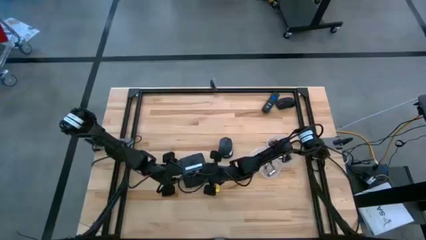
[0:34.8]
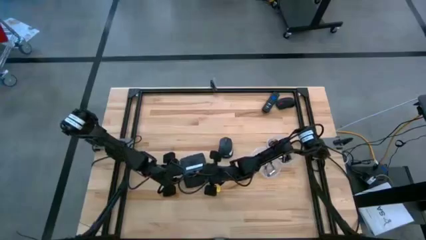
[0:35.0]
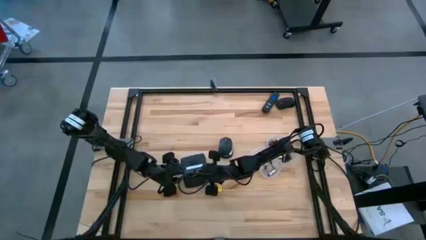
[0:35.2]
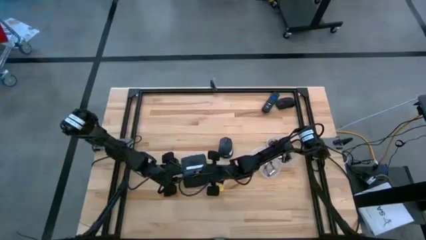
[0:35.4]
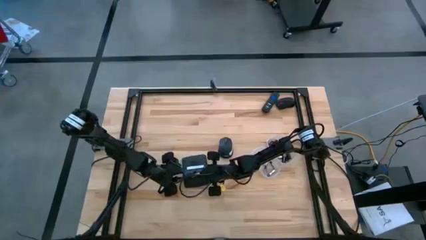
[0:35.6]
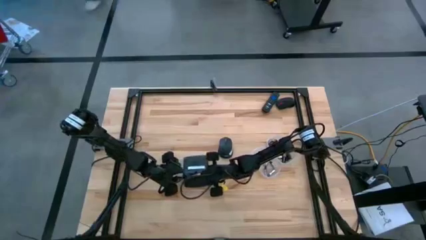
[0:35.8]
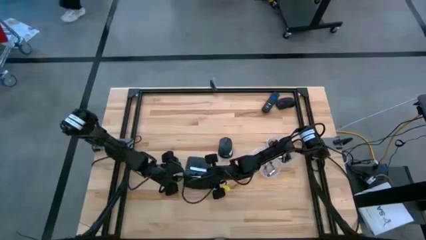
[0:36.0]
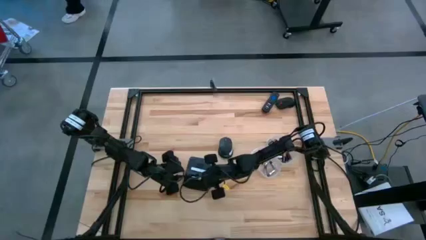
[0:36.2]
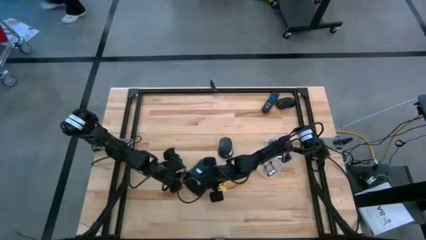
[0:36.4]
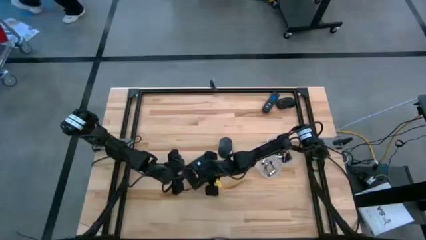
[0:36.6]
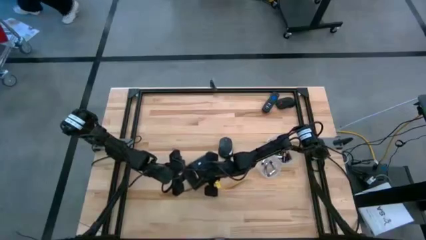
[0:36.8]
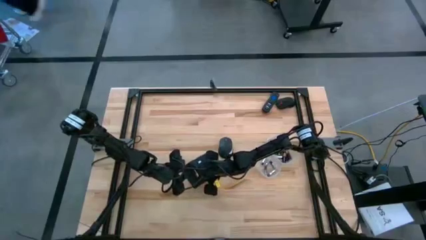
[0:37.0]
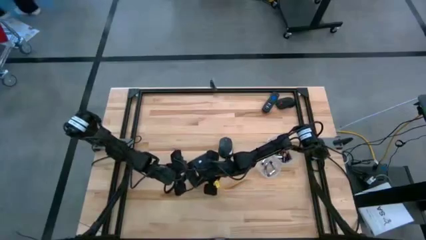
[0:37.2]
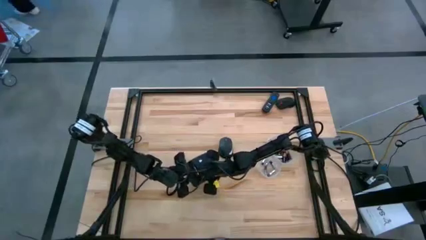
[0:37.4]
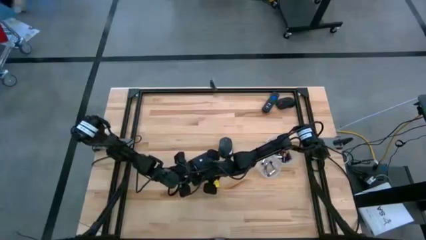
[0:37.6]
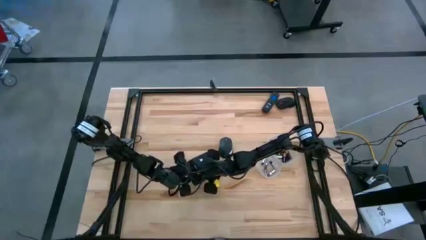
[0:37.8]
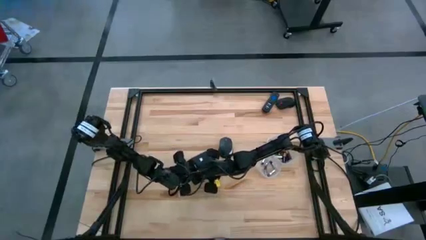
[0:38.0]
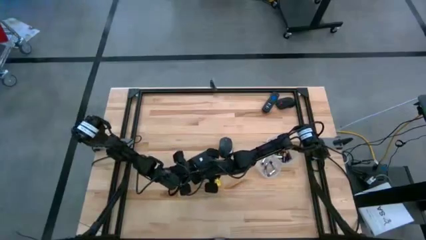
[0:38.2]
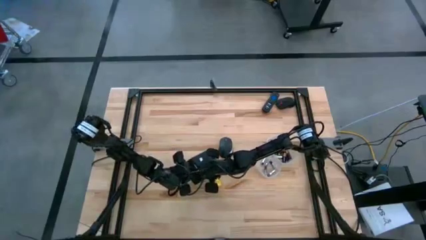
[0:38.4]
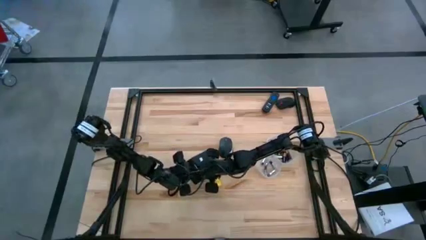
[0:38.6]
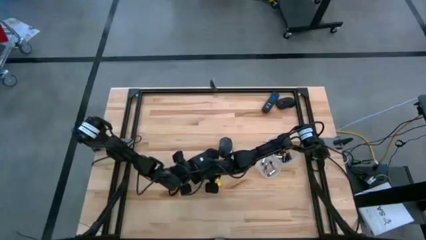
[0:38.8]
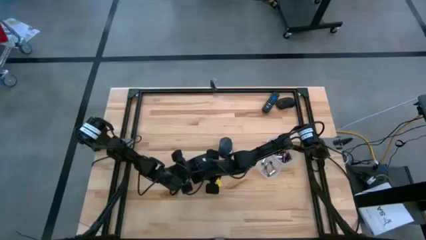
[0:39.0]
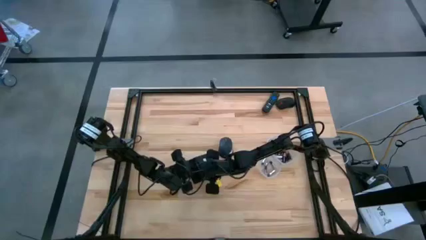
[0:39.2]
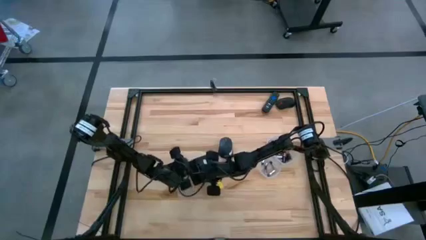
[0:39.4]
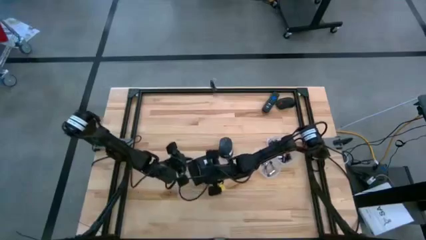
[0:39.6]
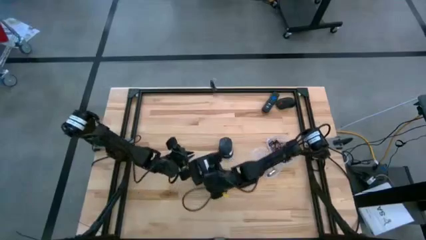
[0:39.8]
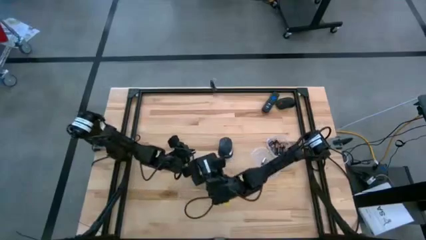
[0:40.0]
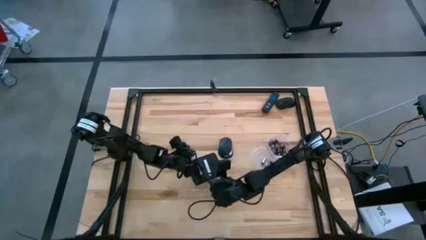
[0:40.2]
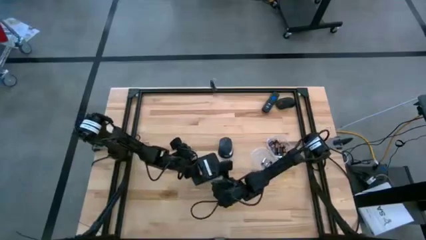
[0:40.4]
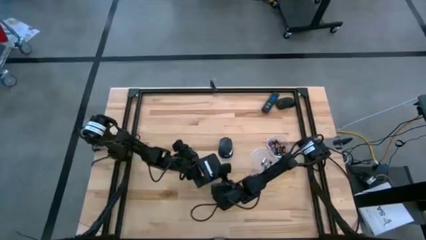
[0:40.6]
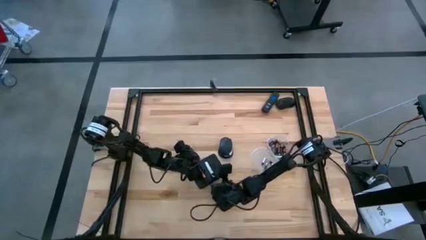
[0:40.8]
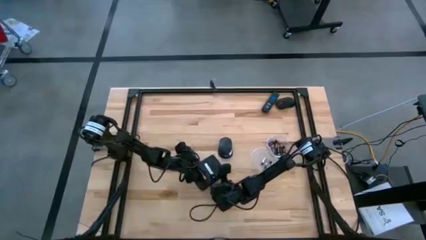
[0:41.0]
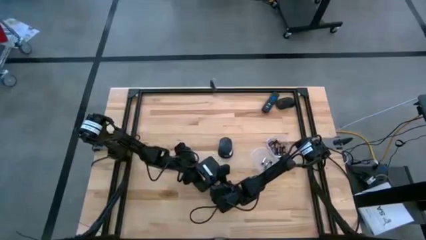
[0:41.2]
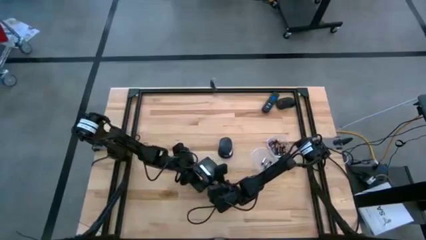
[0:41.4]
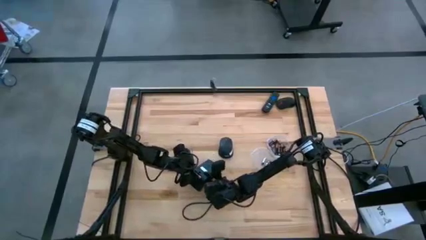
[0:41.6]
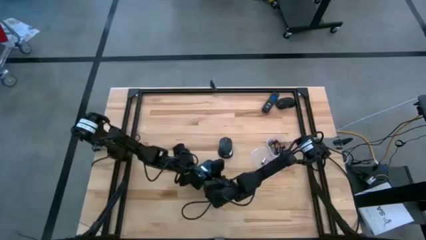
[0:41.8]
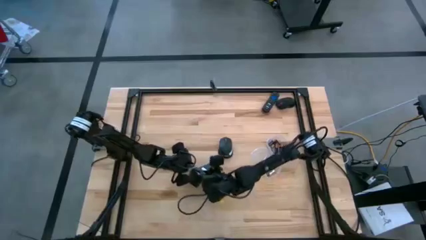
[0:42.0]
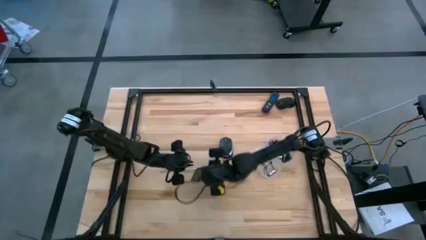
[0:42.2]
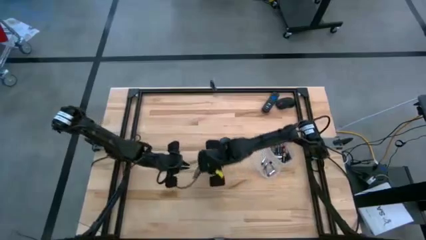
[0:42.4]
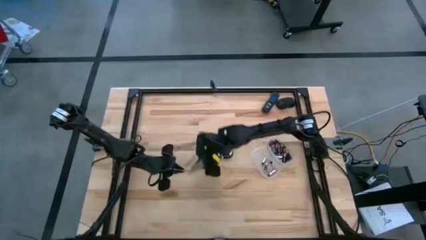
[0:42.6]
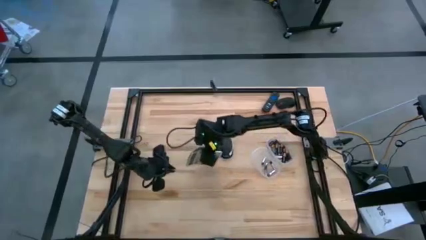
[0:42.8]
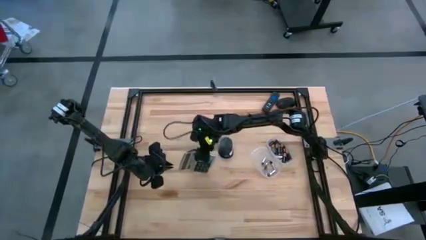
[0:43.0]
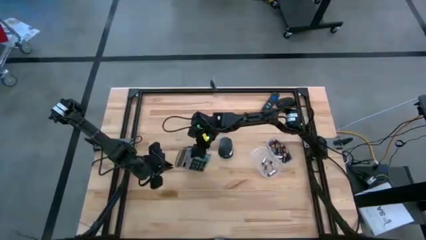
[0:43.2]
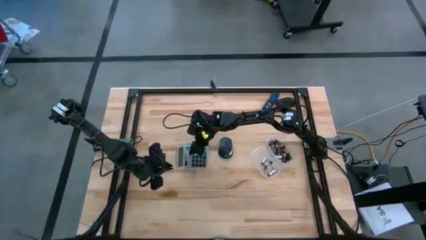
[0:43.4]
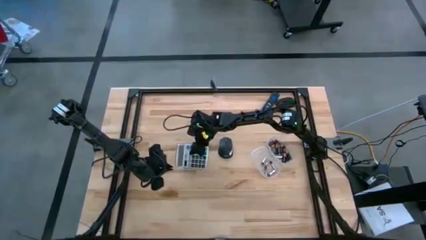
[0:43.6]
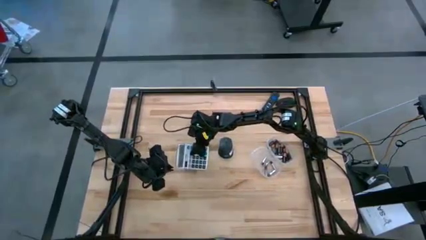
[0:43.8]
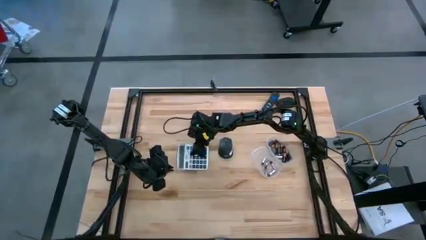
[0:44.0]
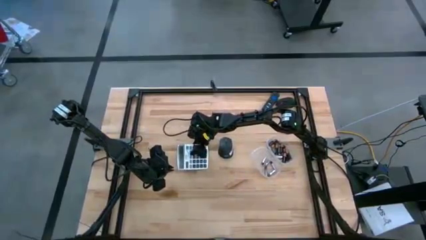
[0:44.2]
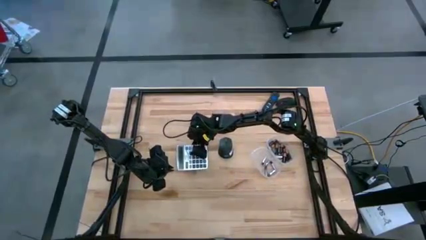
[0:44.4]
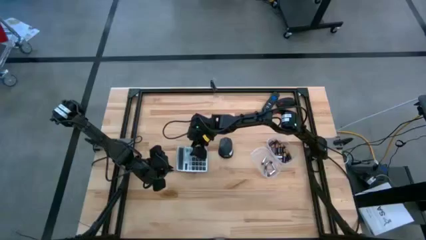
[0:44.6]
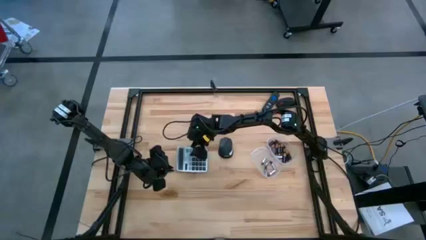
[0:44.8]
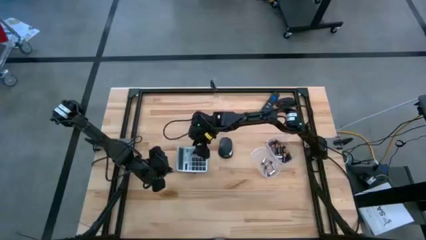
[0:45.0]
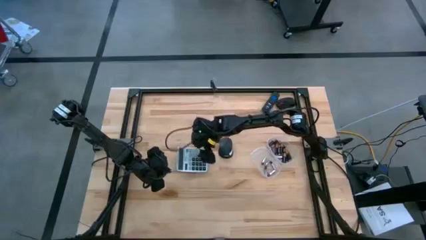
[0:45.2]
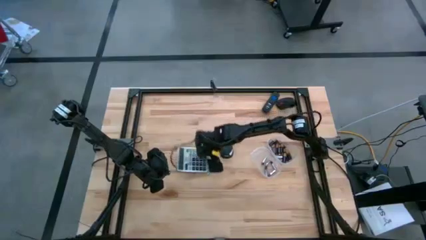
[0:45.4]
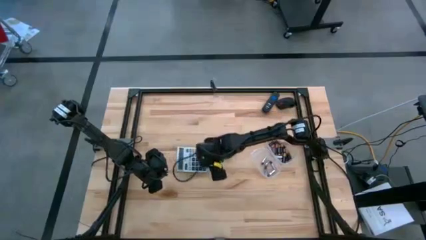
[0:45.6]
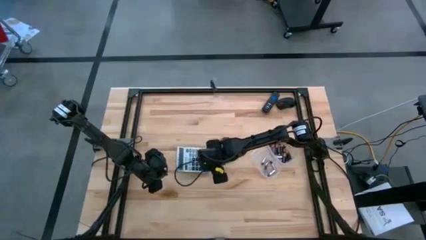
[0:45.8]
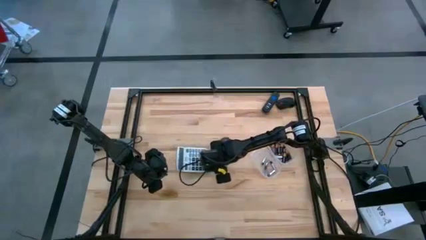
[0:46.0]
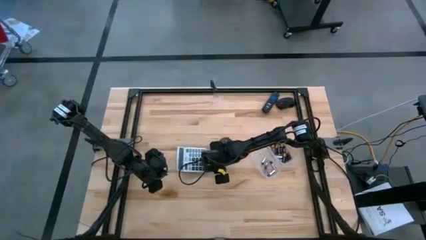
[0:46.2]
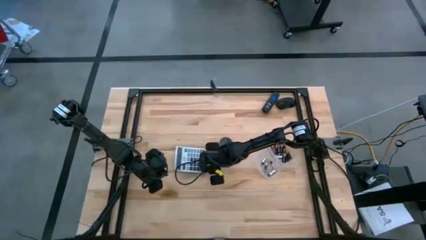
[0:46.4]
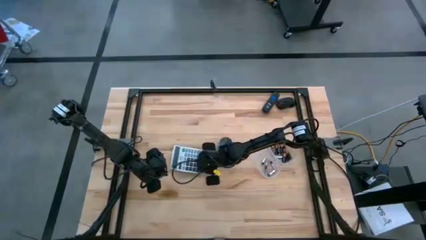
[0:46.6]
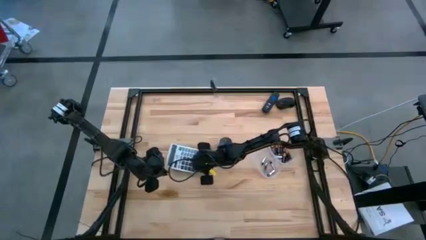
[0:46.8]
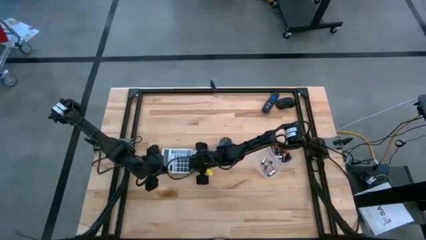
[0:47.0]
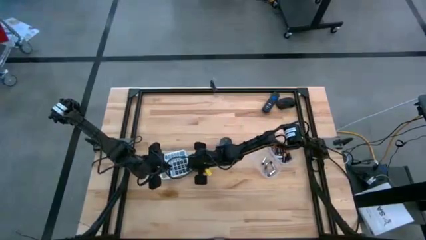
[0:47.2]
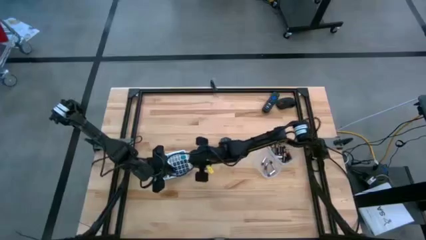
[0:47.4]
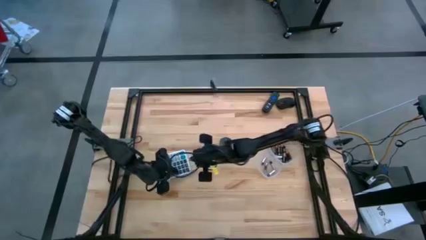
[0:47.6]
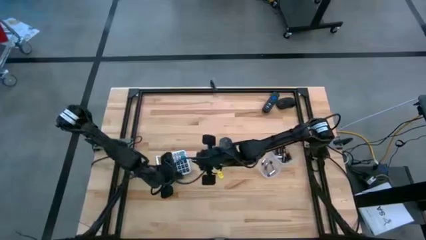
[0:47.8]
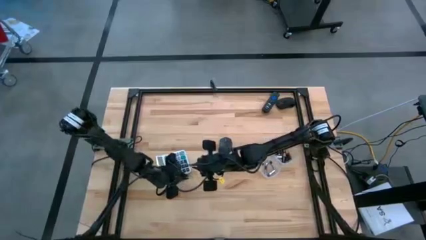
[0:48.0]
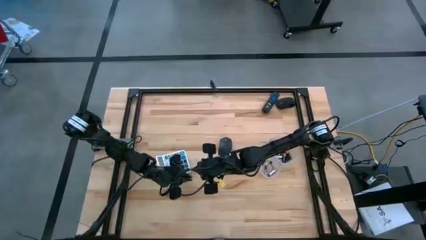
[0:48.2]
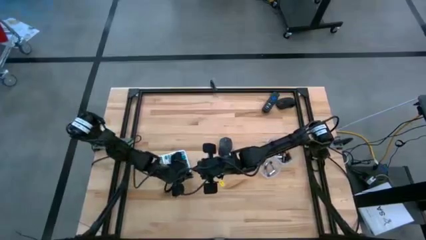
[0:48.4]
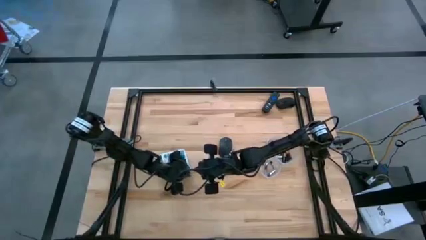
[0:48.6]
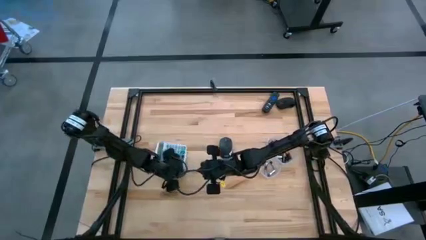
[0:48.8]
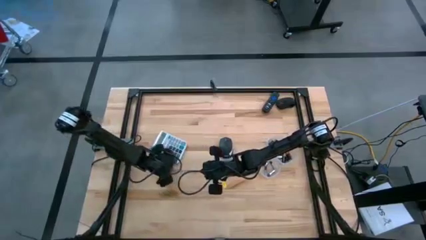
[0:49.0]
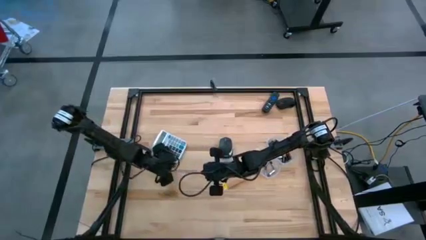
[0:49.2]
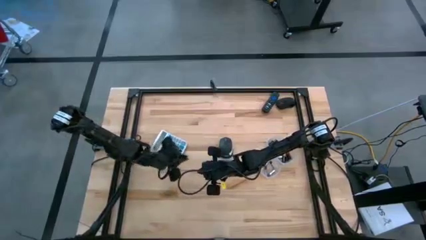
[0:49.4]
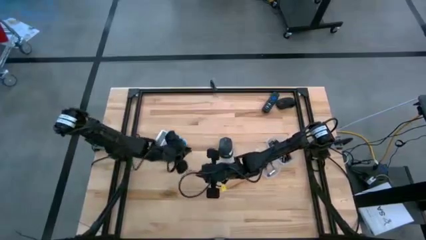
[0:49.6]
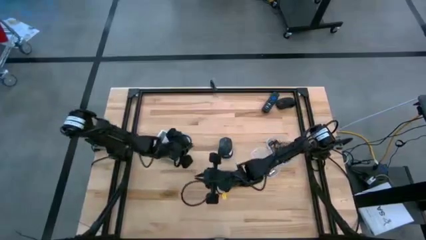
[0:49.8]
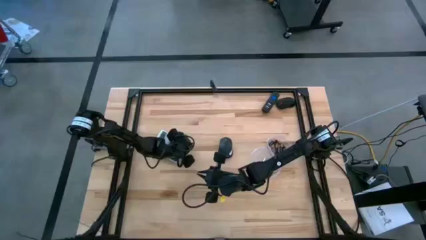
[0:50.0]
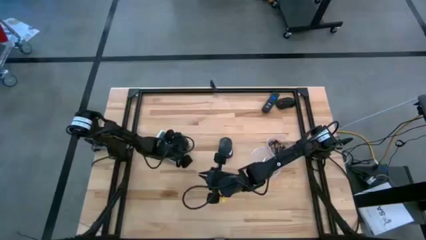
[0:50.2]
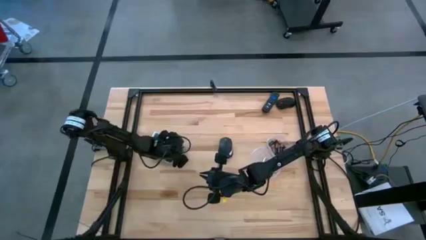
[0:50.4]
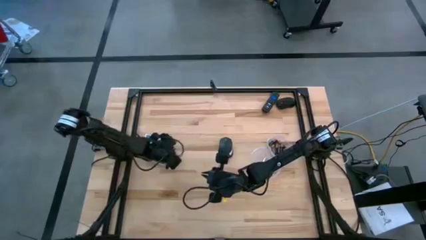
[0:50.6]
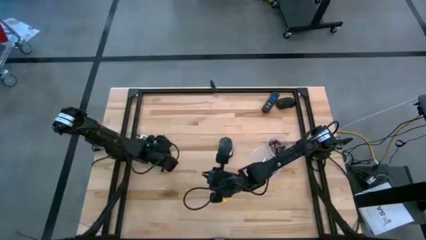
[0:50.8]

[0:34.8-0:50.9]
Task: Insert battery
Insert the brown battery into the calculator battery compartment
